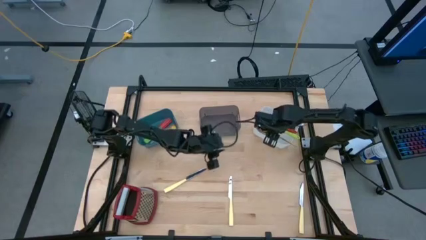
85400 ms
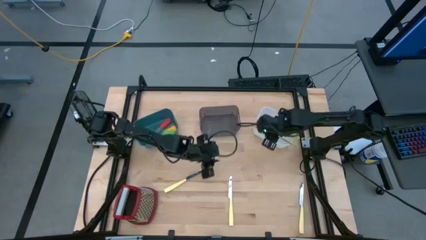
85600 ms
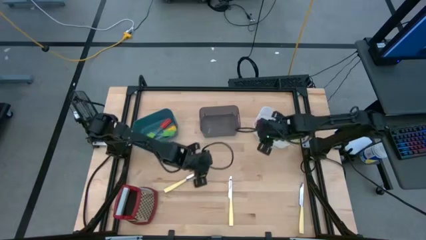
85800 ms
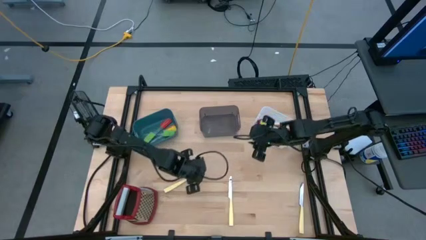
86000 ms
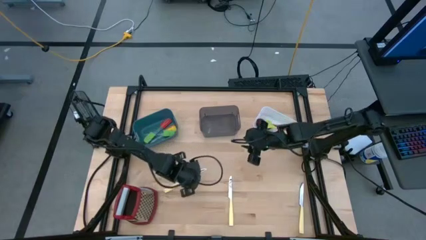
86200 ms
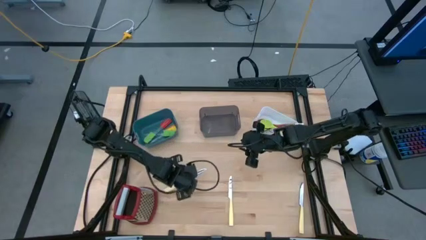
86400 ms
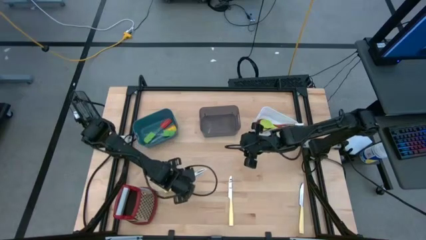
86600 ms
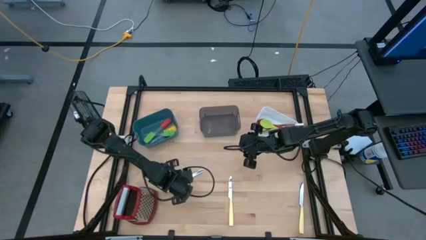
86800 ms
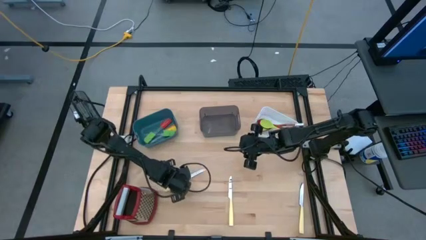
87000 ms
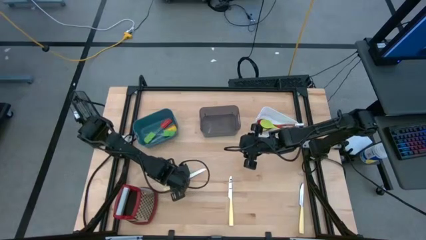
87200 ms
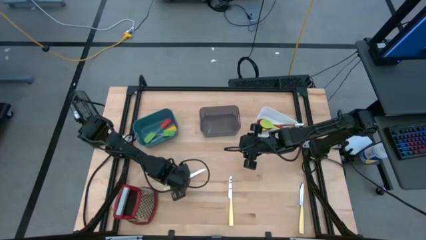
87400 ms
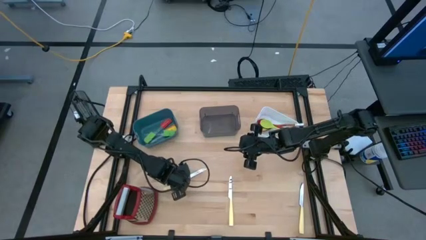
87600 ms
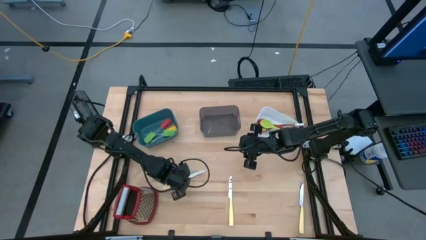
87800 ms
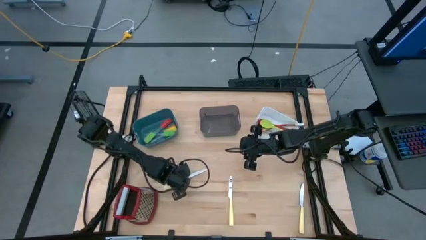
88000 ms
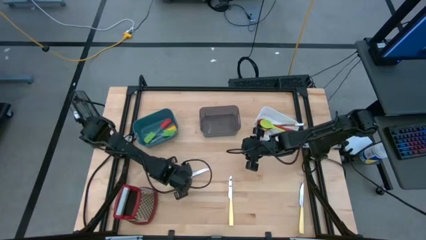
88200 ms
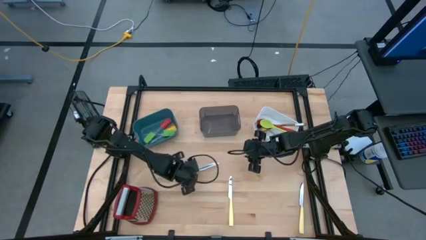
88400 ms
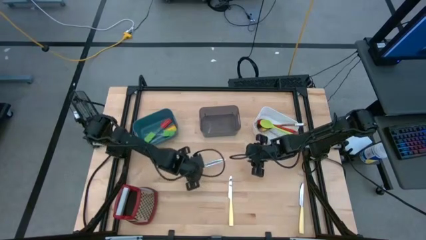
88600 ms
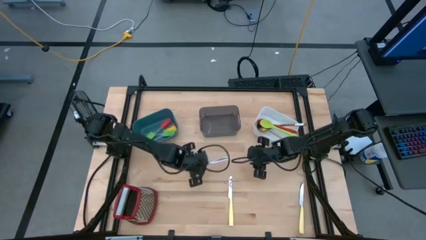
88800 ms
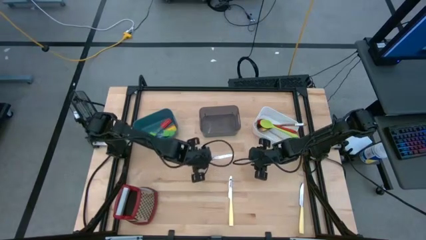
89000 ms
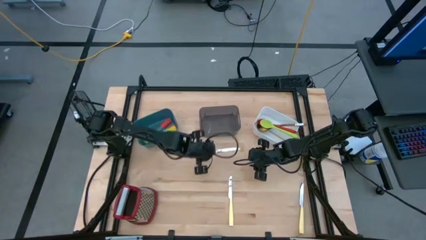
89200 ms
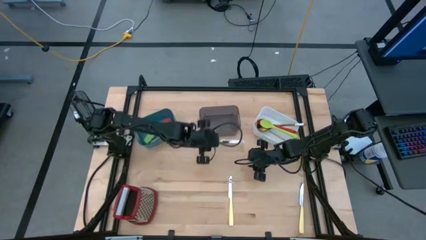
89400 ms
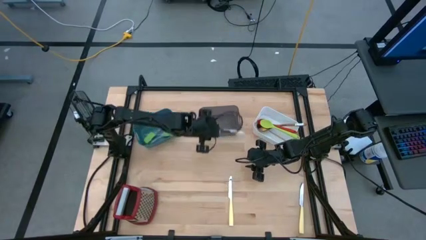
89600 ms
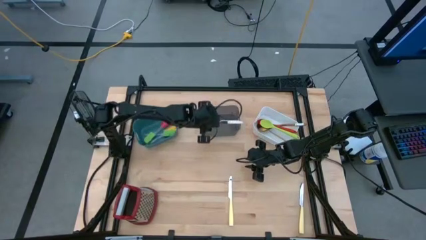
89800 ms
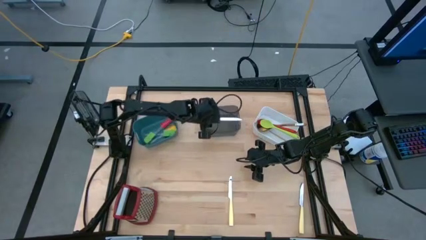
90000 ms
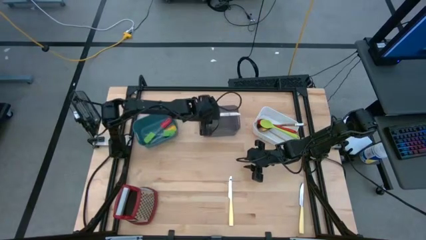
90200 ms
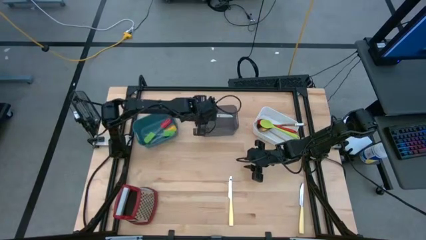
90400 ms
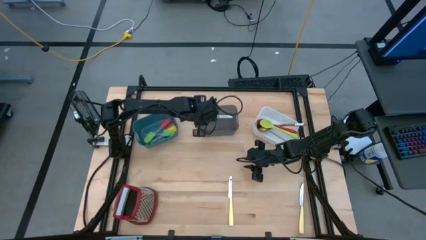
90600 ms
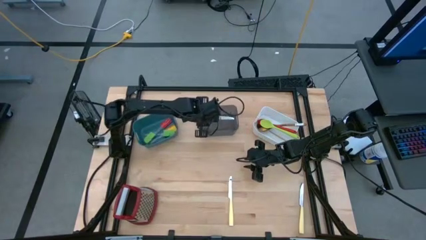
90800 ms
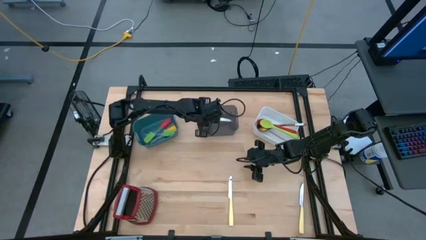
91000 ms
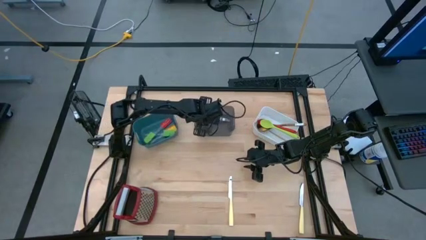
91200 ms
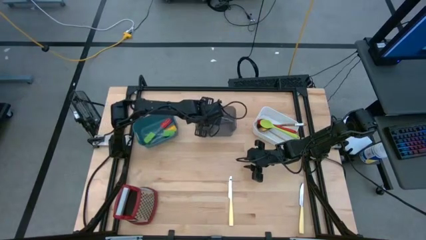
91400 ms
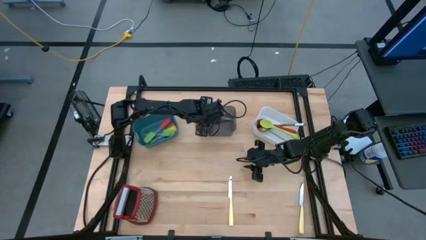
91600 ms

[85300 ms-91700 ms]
Task: Pick & Place Kitchen Items
Put the left yellow table knife into the black bin

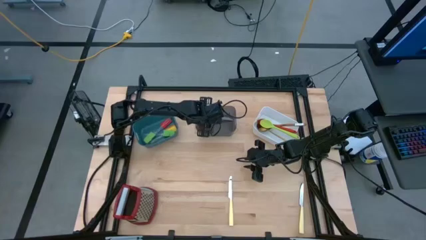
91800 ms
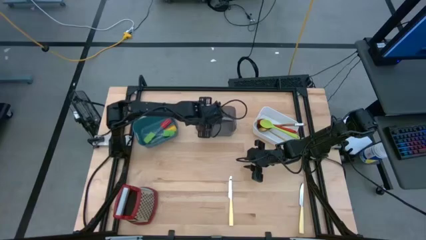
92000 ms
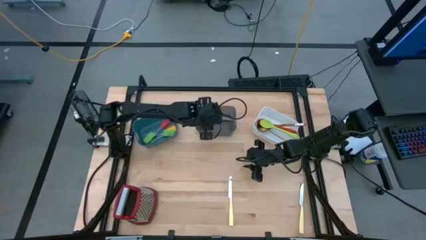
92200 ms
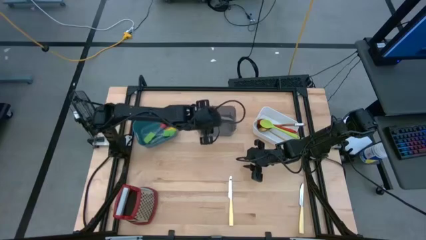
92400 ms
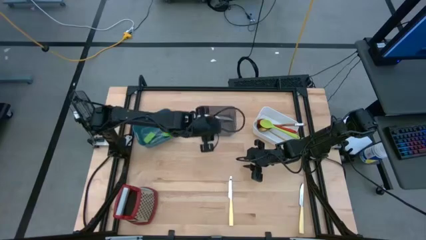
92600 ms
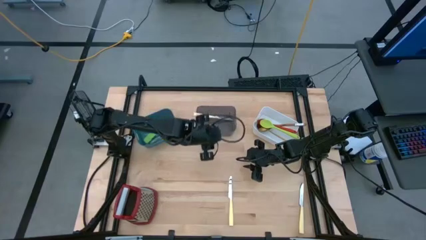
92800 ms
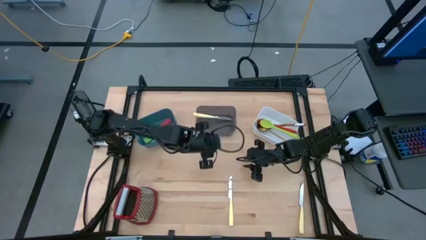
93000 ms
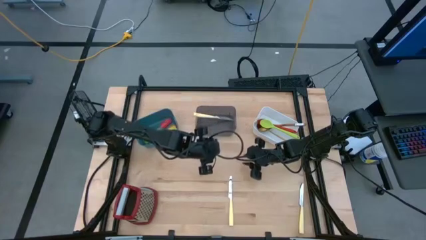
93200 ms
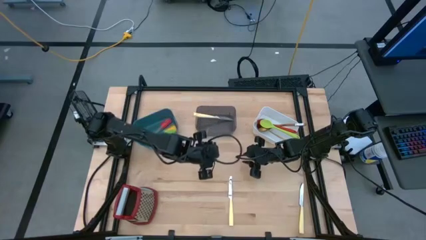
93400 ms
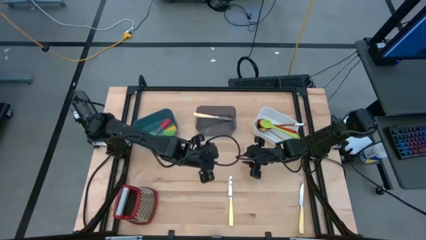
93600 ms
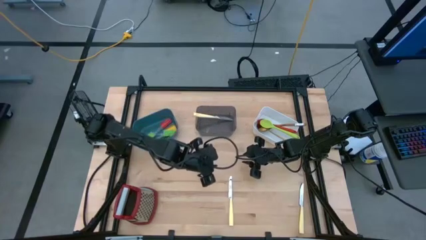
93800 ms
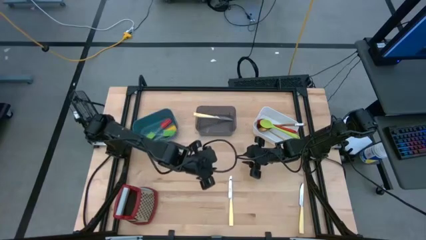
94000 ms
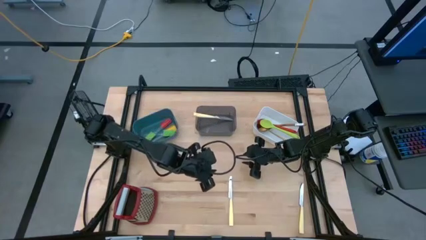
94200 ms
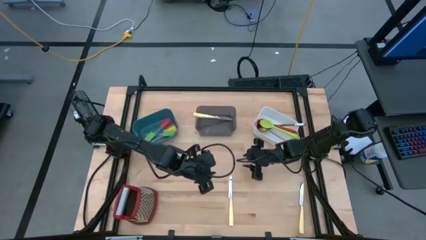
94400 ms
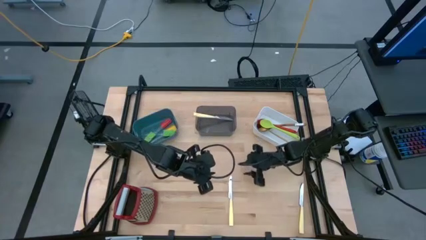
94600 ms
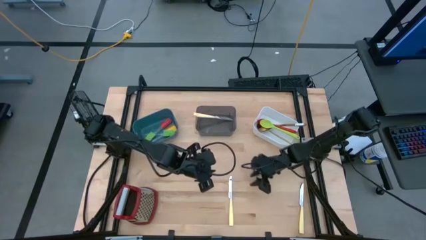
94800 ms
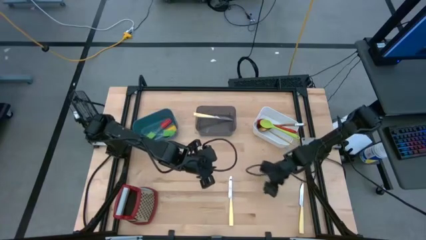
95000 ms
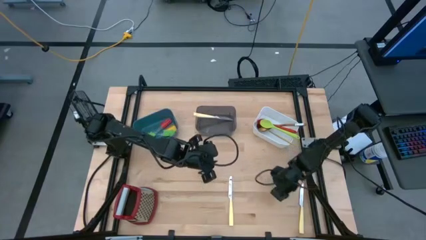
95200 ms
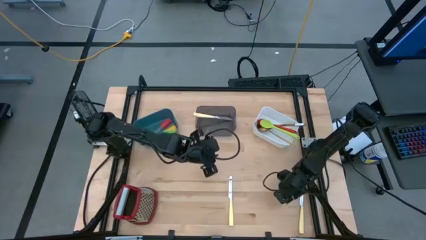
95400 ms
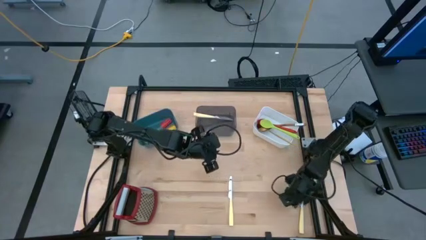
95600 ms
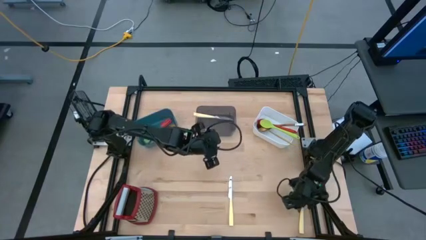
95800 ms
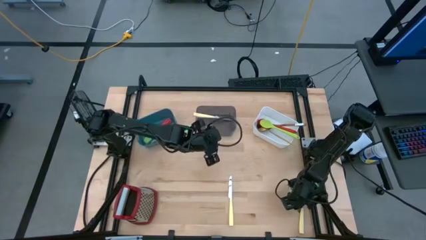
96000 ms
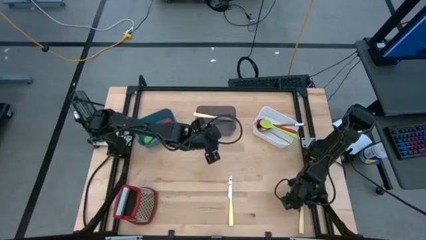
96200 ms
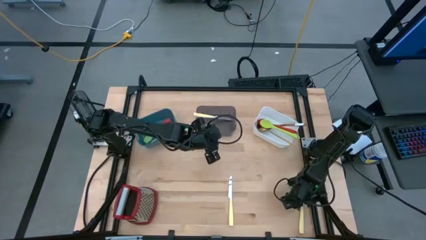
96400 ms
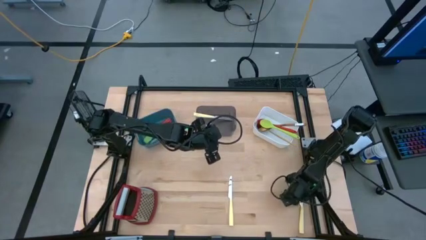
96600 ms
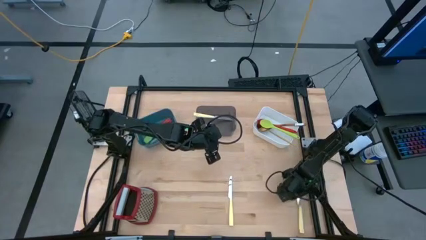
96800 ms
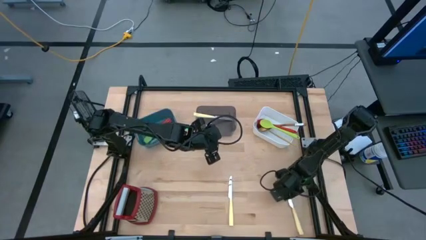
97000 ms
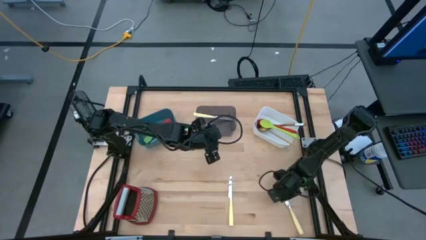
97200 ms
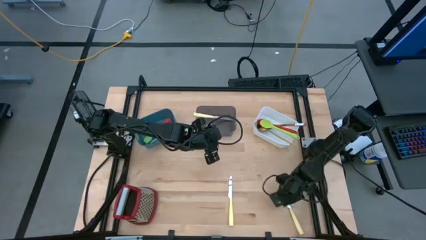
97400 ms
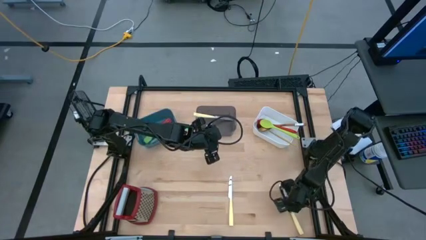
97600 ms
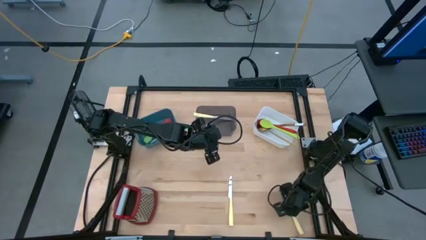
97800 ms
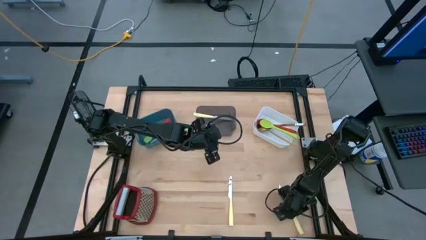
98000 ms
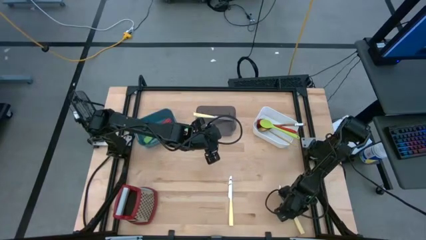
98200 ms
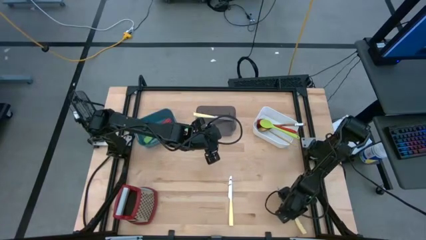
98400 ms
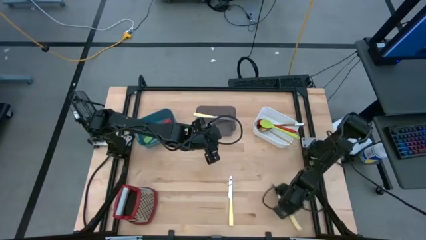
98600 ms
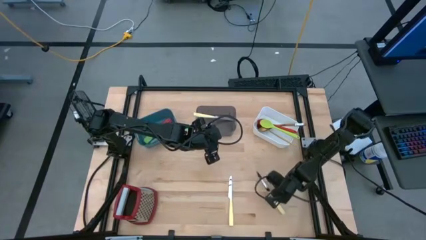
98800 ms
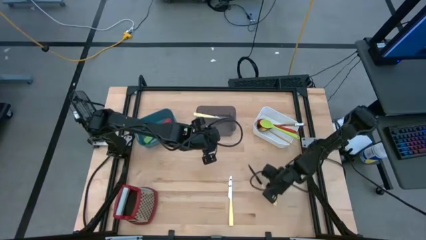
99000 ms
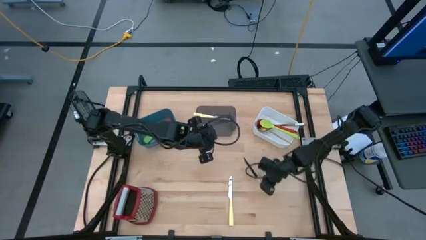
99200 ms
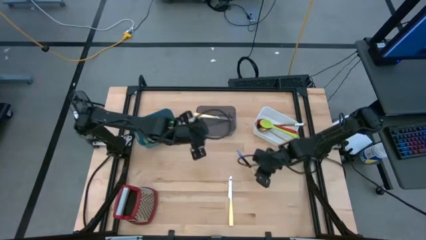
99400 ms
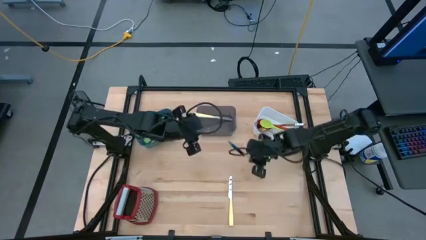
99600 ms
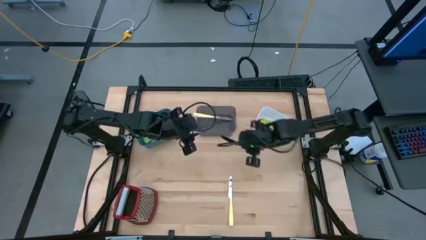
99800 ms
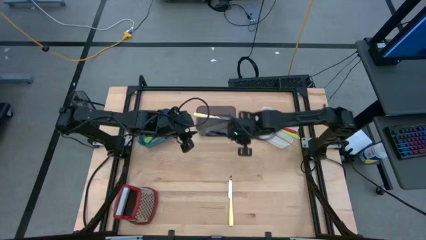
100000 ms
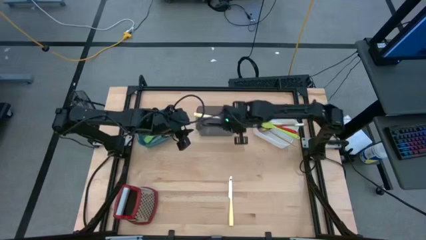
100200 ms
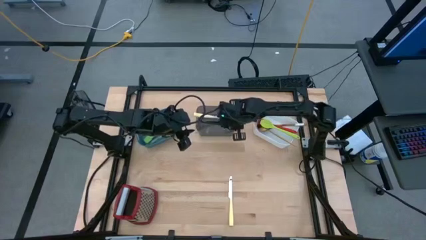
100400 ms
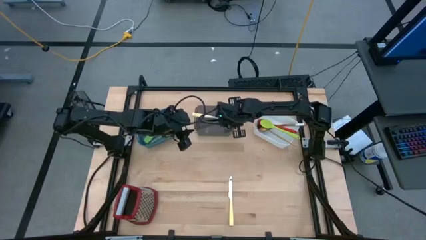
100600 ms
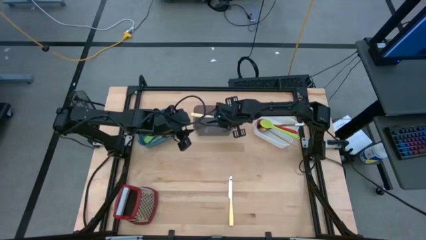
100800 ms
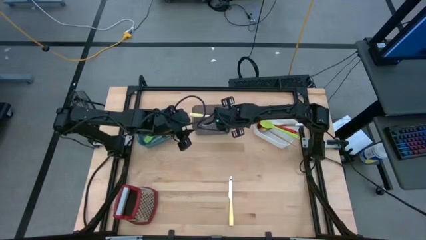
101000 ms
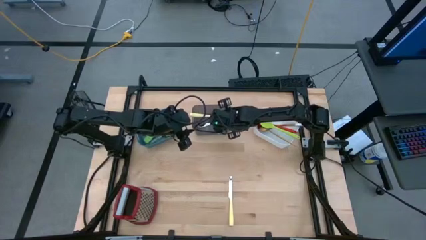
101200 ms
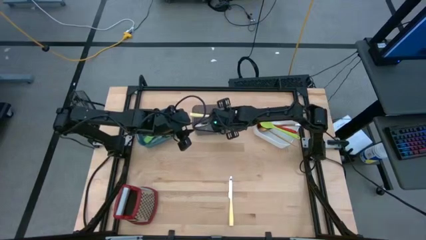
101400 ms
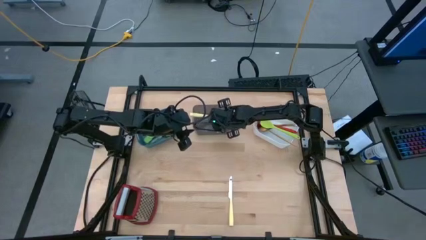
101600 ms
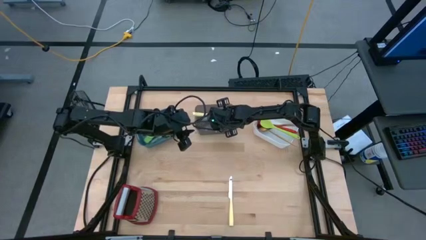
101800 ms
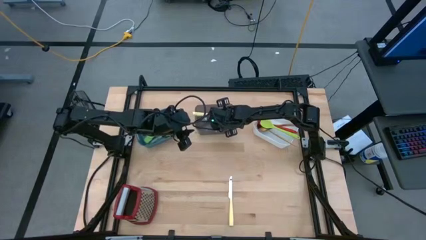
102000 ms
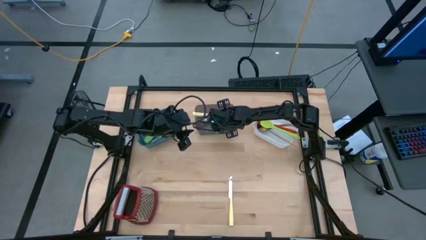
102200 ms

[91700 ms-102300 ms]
Put the right yellow table knife into the black bin
